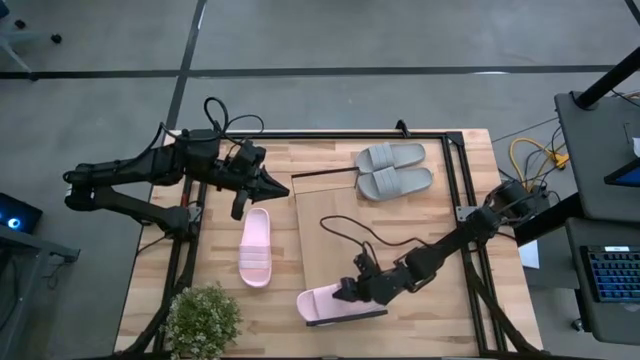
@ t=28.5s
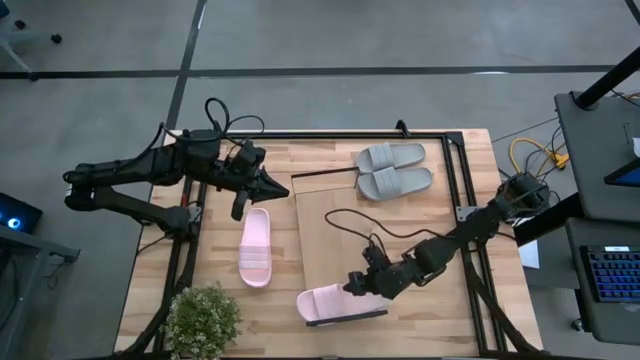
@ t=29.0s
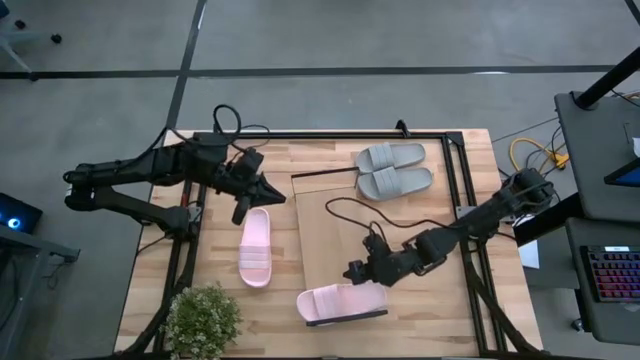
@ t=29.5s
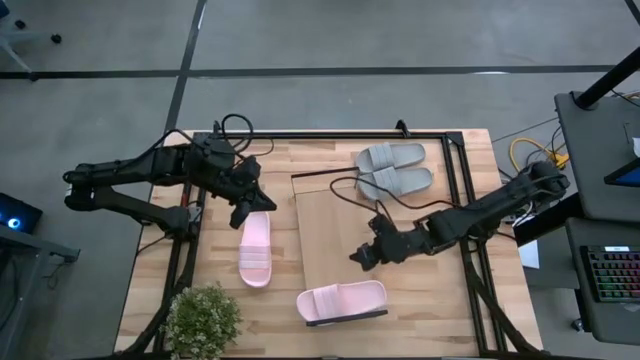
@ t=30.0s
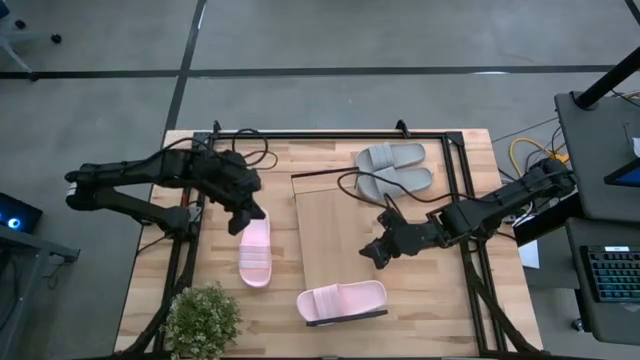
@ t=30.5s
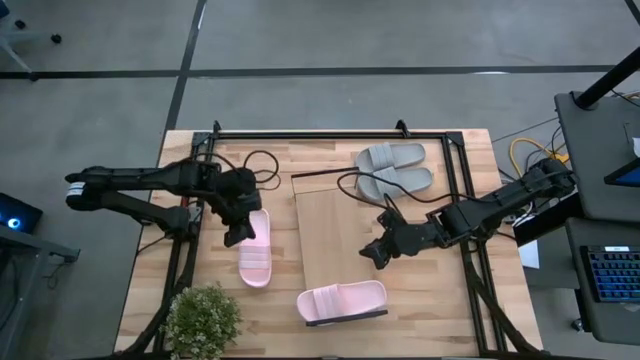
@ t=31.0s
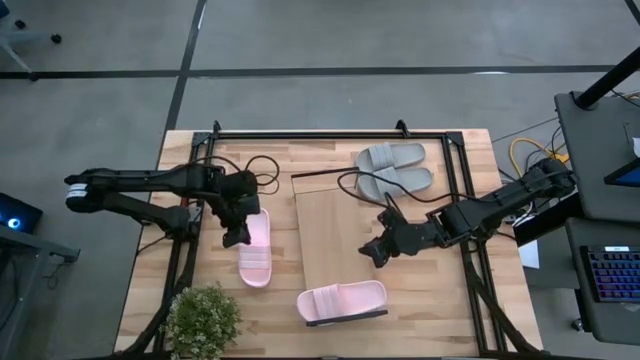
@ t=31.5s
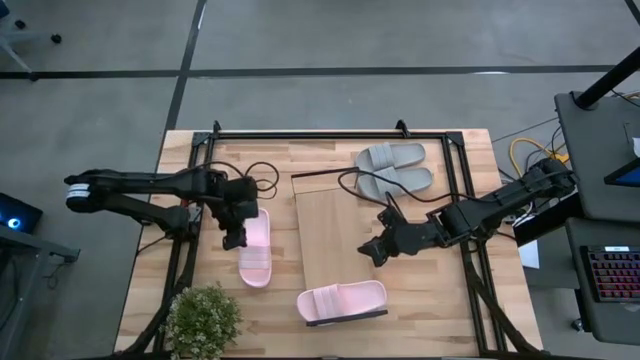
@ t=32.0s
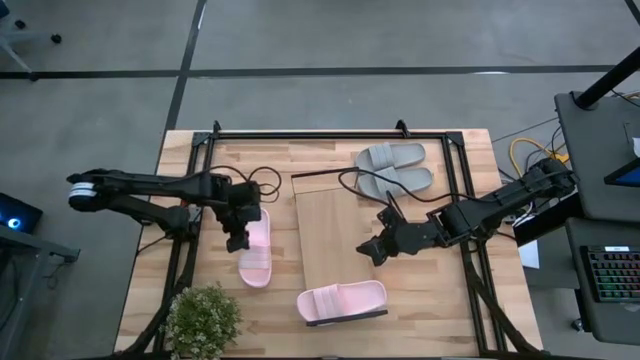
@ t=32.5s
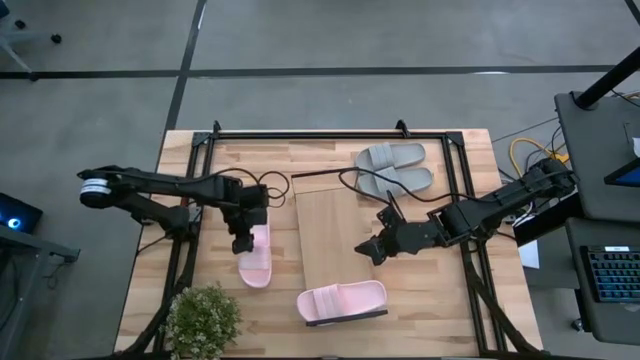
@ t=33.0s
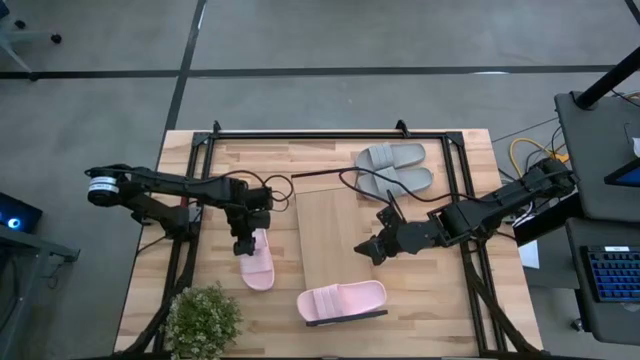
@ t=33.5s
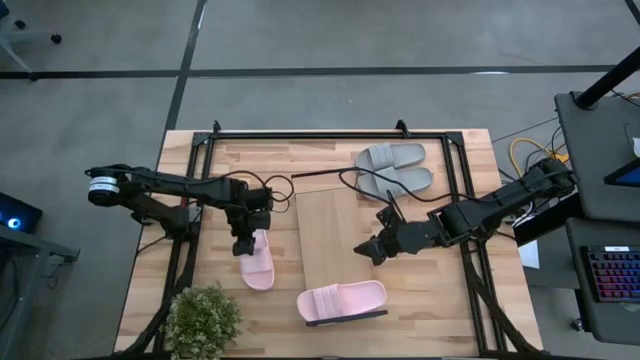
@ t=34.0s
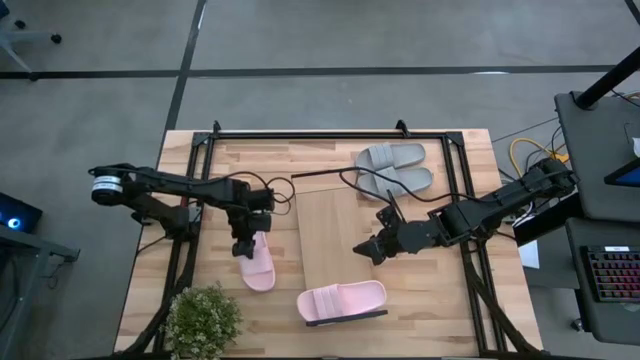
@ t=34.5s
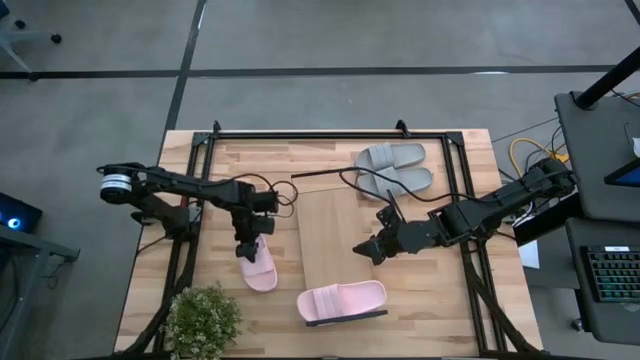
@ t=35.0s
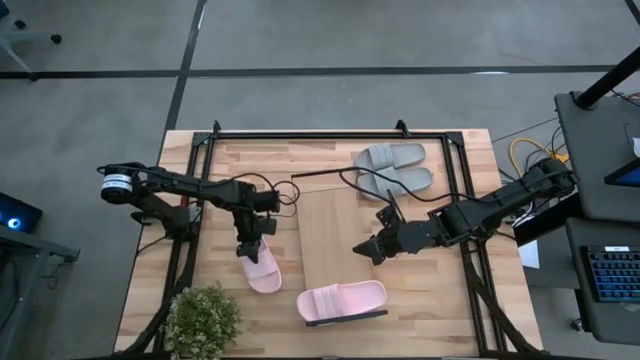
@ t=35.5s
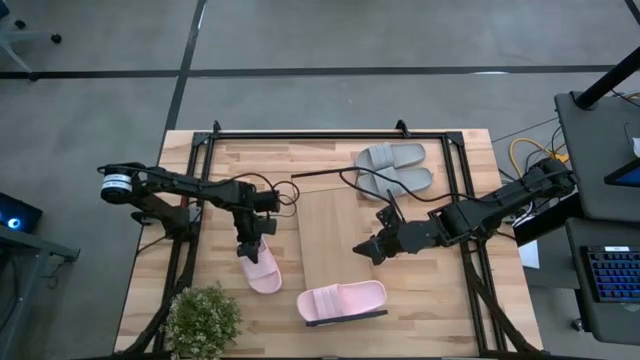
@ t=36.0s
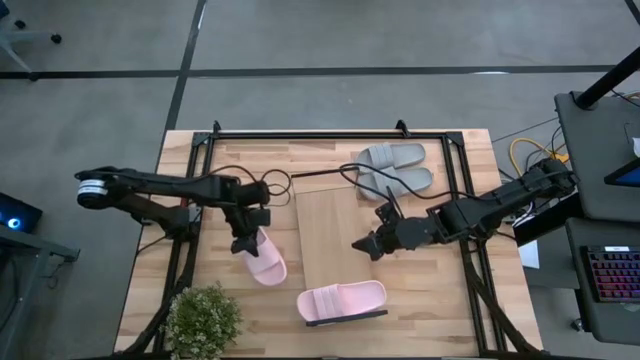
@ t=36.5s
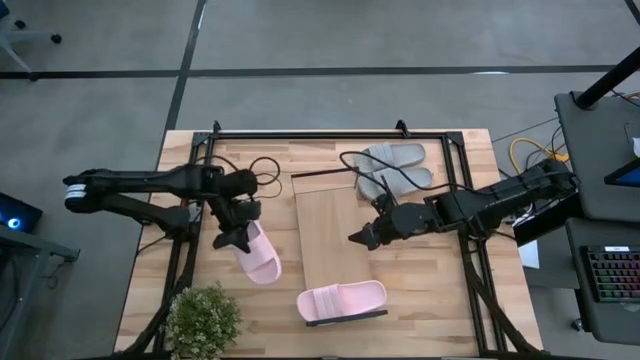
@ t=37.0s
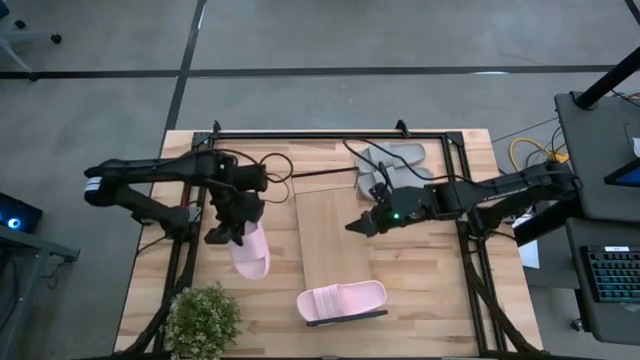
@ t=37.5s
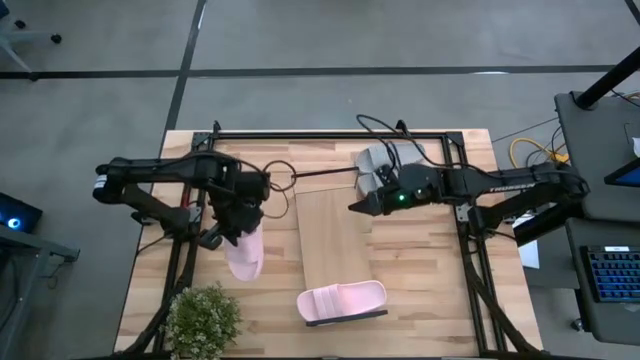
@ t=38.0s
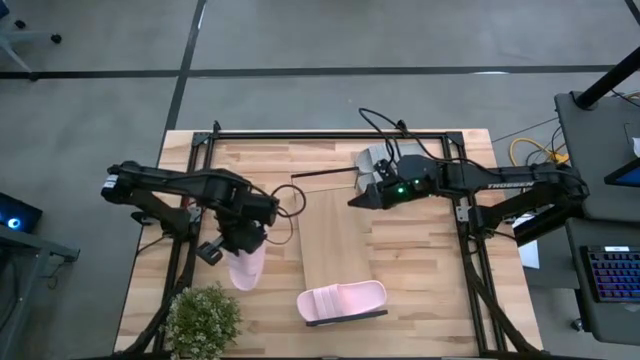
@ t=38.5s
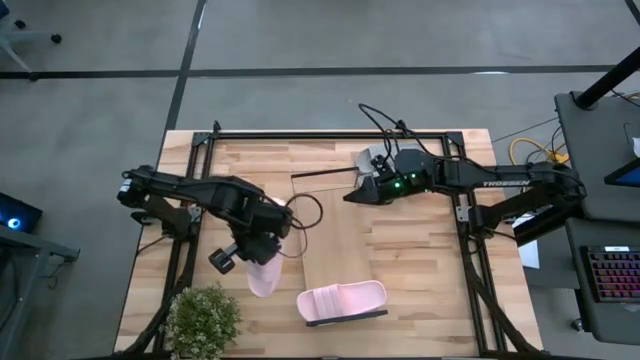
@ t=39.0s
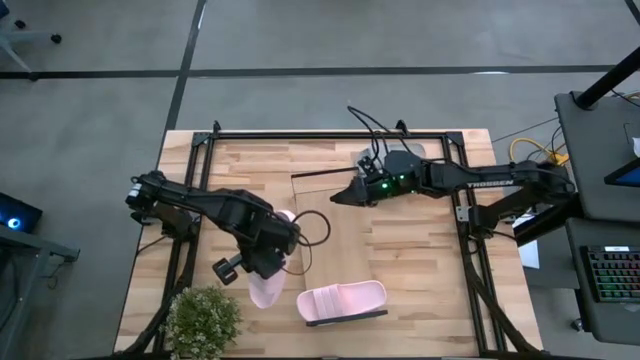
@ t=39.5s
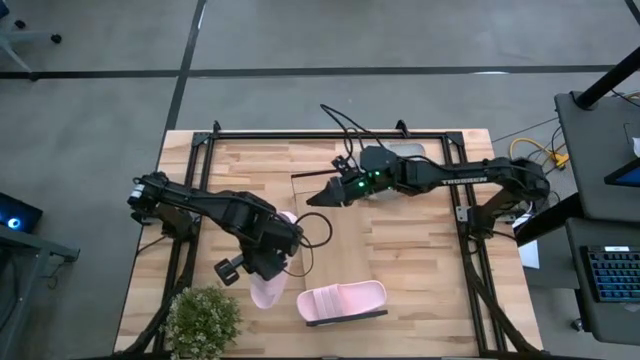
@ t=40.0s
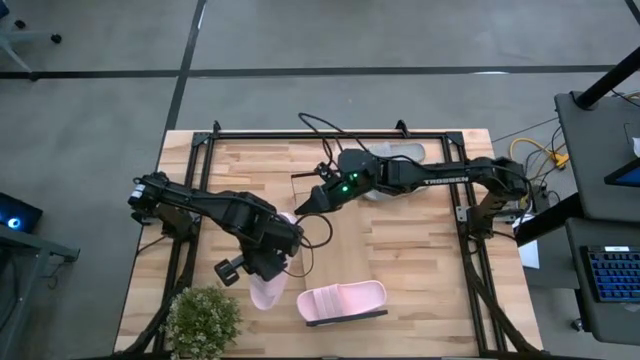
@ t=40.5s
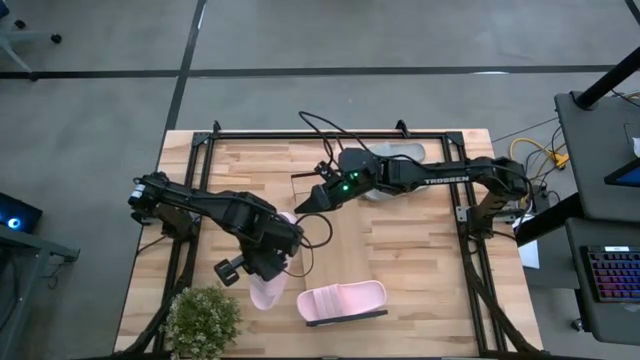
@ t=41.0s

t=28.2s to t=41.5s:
Task: Pick and place slides into the shelf
Put the pink slide on the shelf

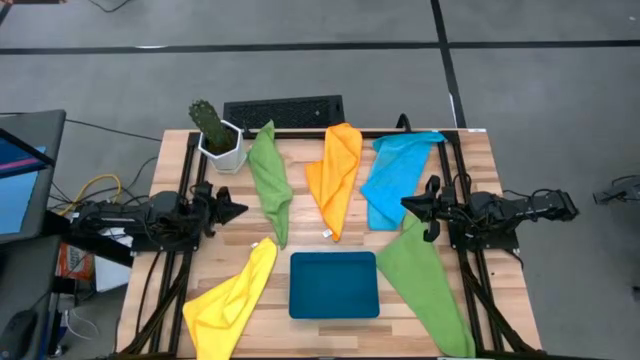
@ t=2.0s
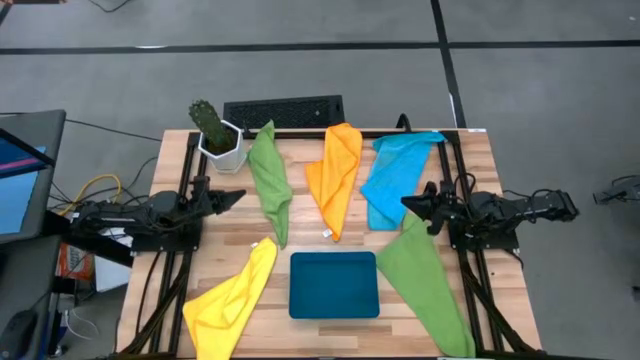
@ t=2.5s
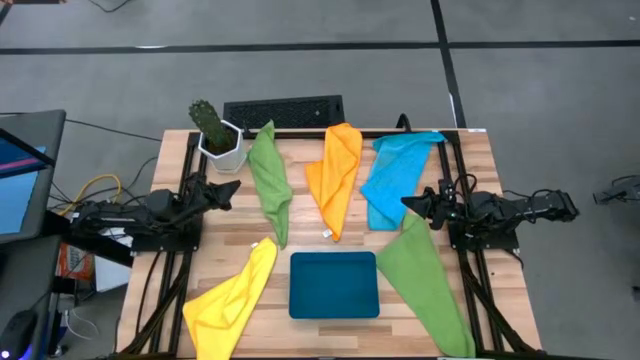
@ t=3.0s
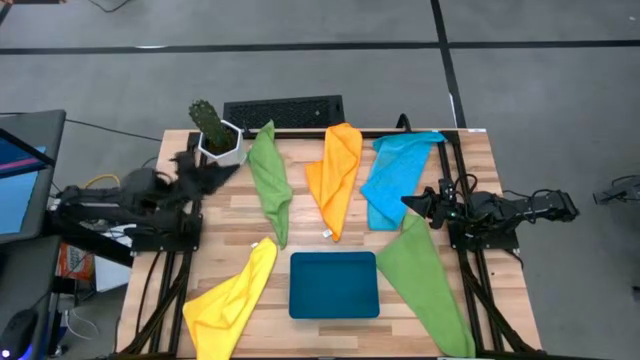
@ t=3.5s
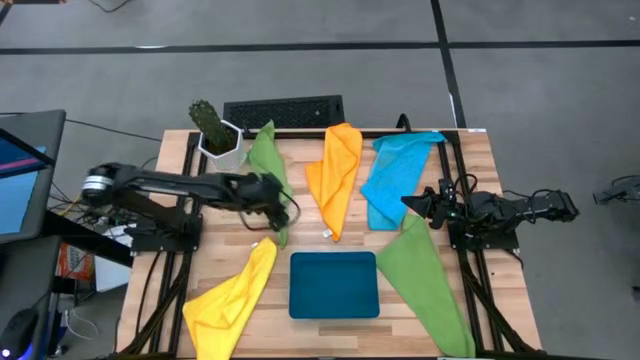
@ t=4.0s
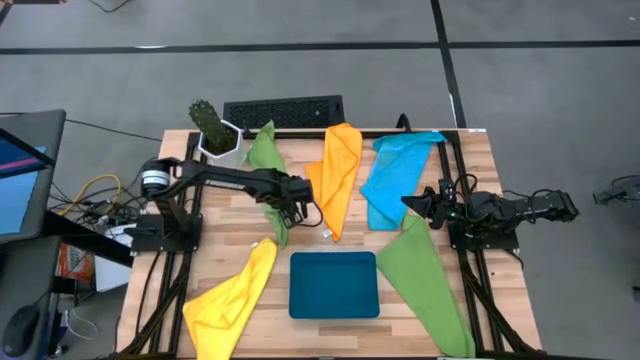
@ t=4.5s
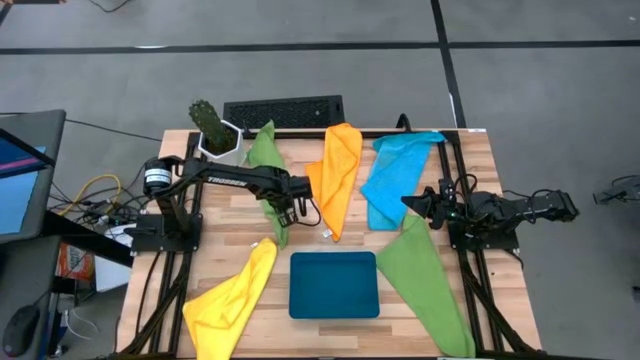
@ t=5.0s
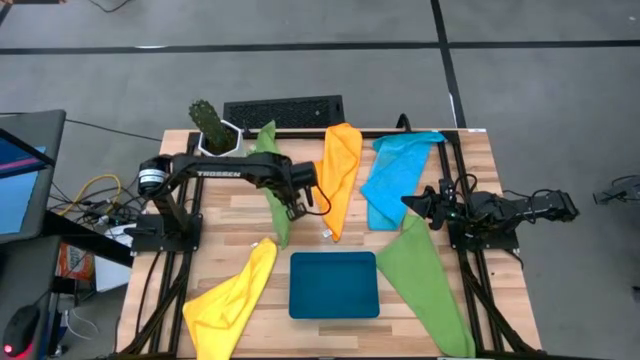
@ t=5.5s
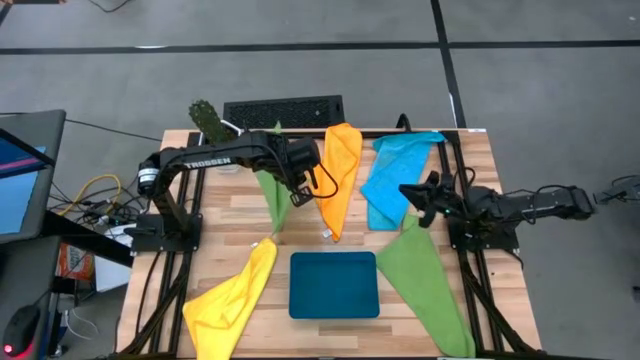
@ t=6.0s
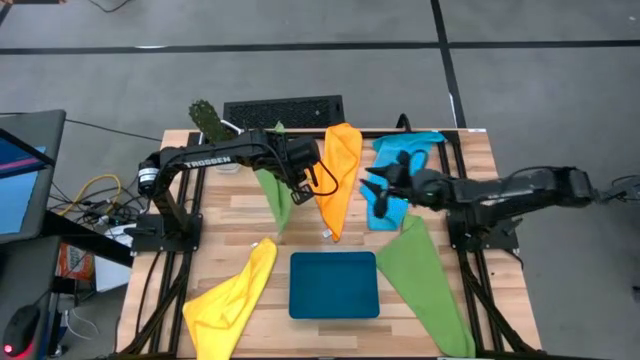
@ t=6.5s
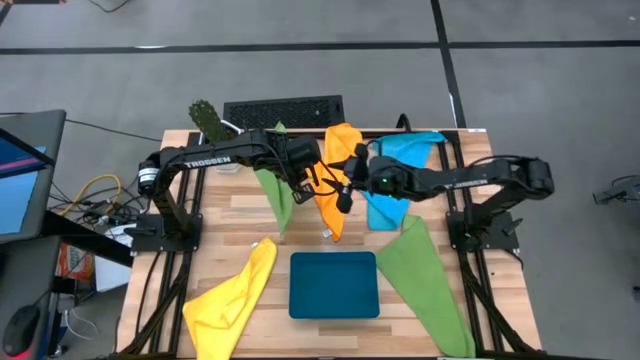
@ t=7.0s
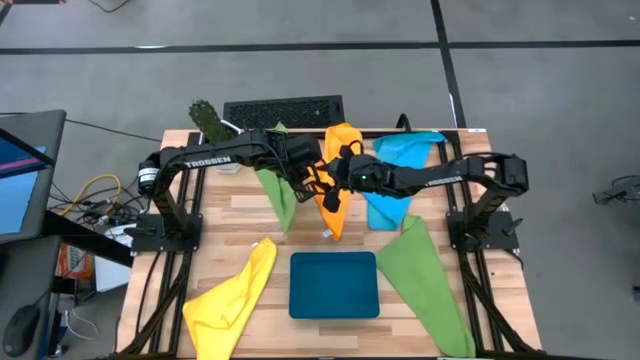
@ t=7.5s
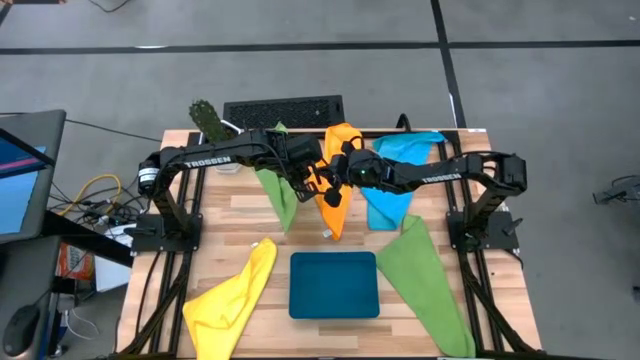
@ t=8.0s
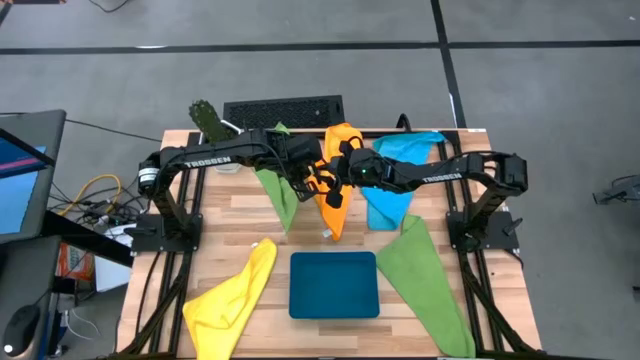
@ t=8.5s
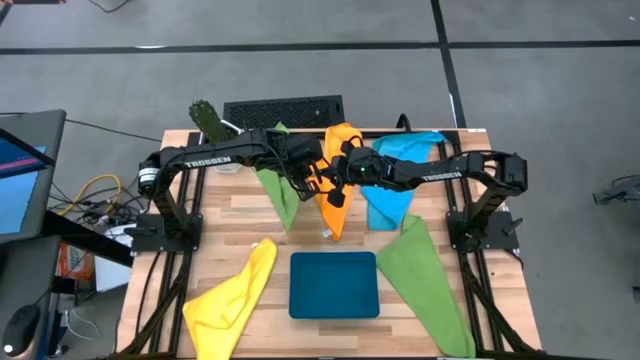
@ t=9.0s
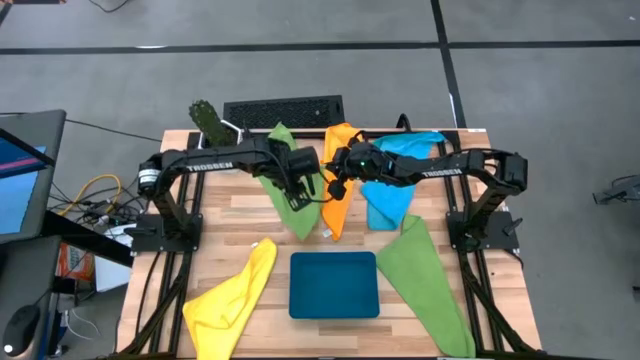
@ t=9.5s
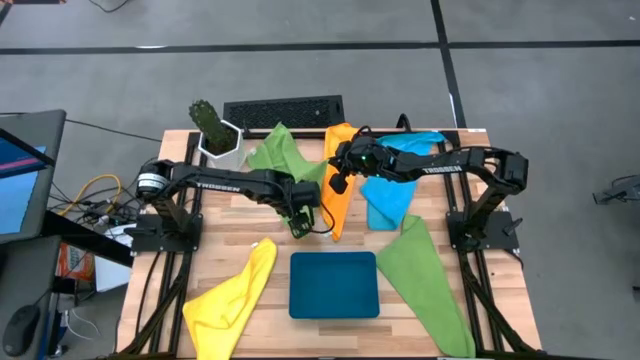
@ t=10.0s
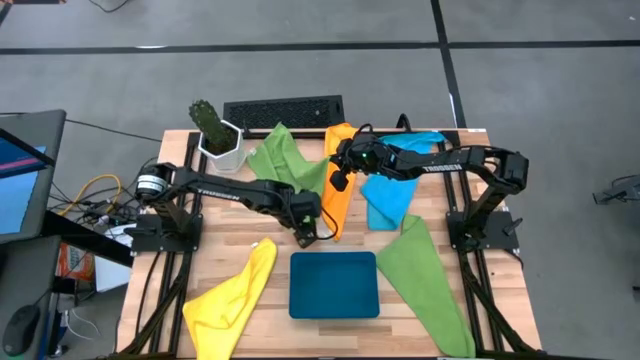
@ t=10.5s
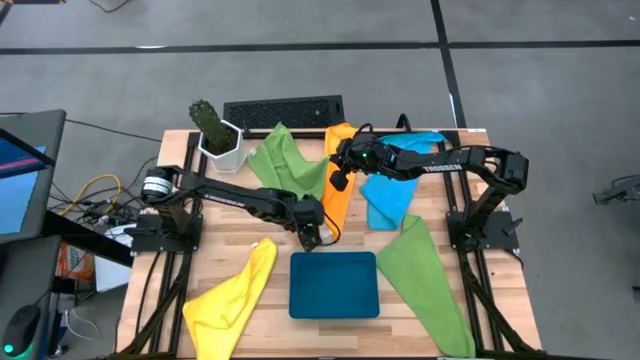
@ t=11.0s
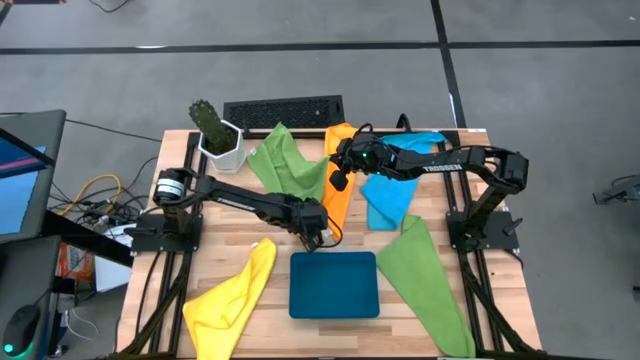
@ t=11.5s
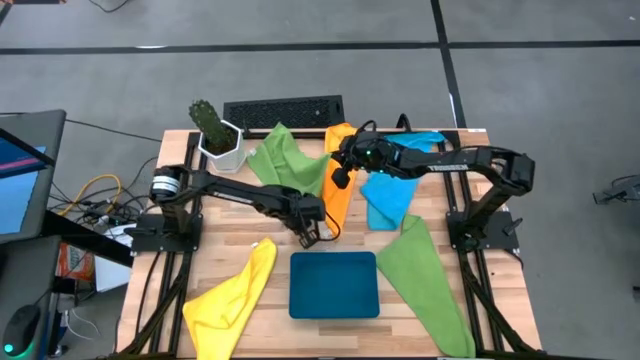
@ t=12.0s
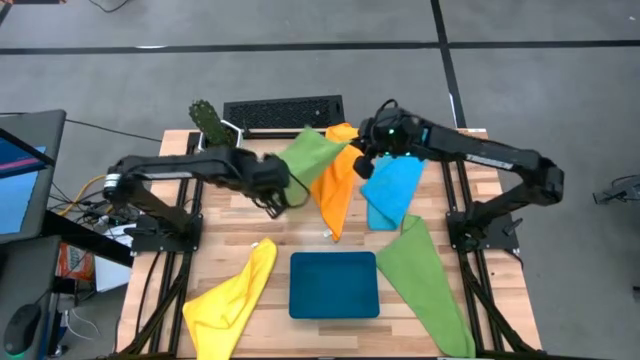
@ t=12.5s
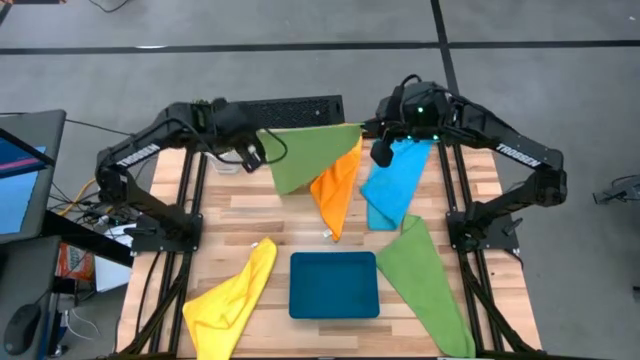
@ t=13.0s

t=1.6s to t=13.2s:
Task: Fold microfiber towels
Fold the top green microfiber towel
